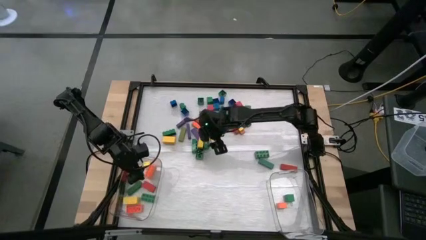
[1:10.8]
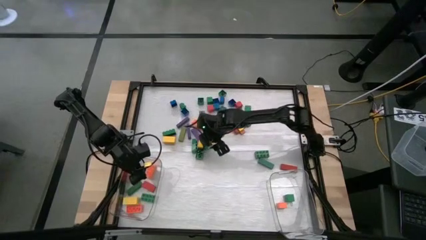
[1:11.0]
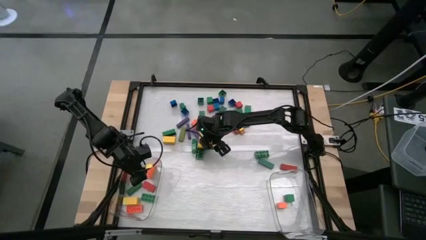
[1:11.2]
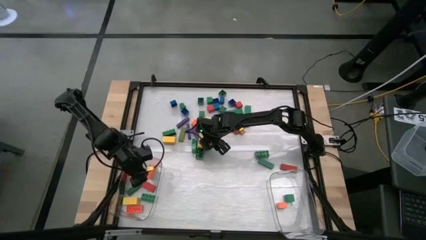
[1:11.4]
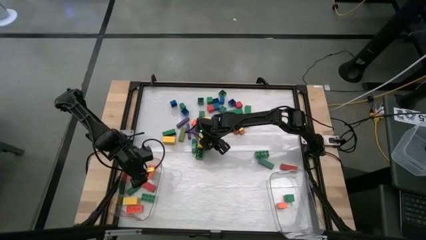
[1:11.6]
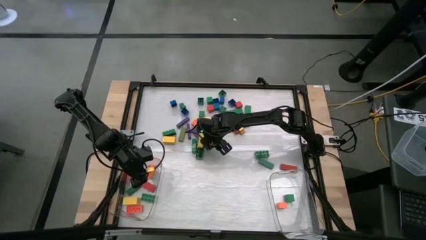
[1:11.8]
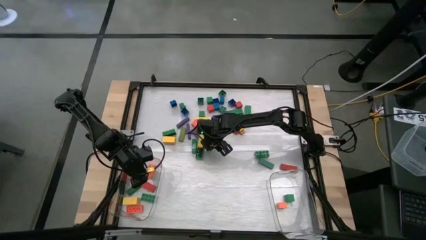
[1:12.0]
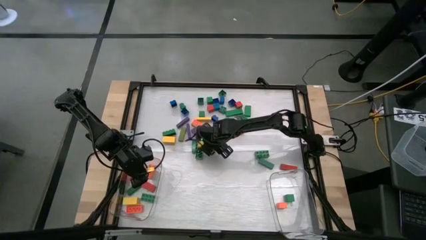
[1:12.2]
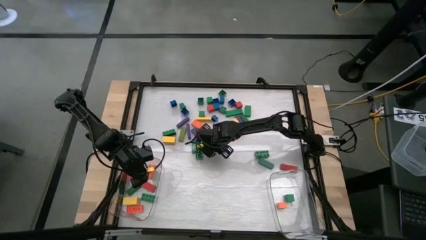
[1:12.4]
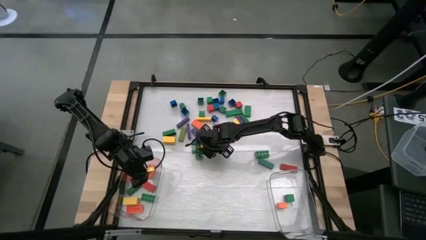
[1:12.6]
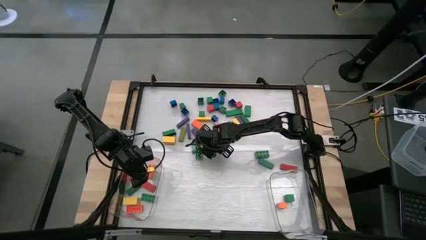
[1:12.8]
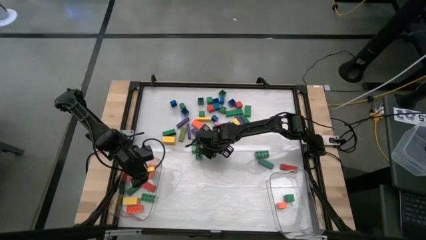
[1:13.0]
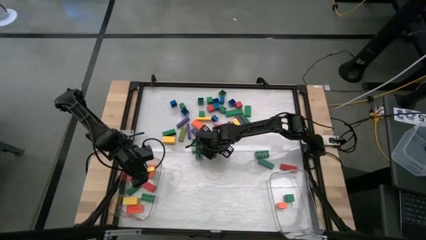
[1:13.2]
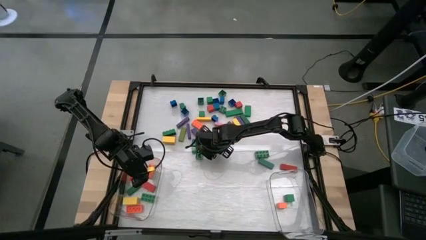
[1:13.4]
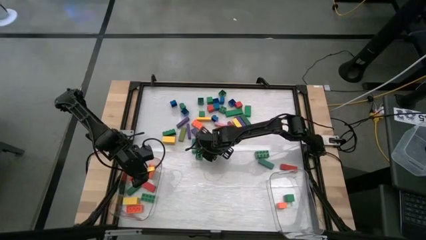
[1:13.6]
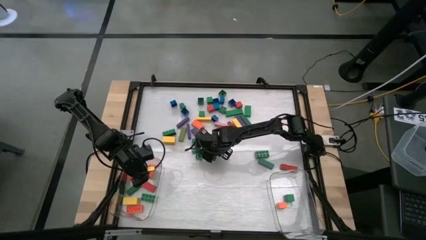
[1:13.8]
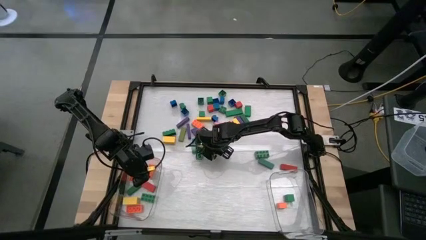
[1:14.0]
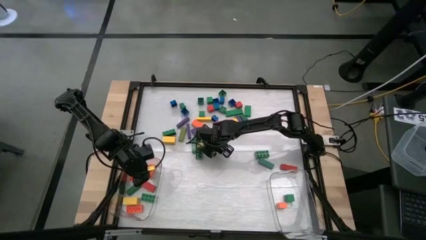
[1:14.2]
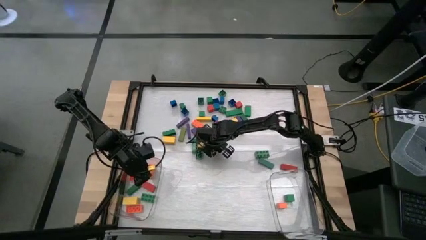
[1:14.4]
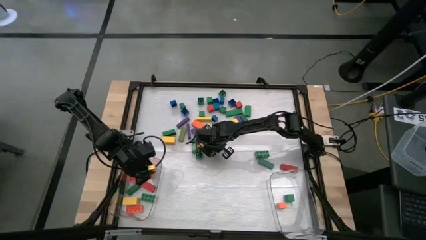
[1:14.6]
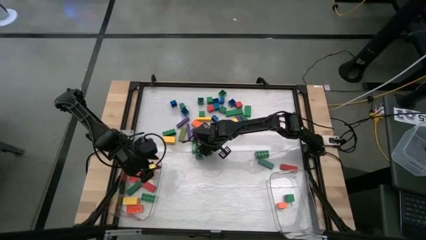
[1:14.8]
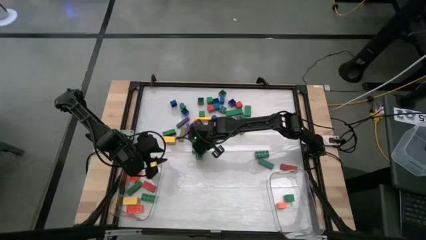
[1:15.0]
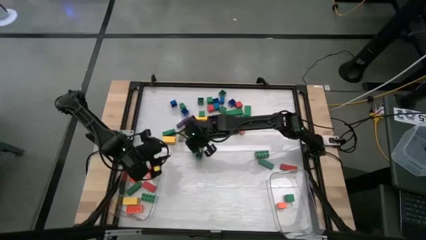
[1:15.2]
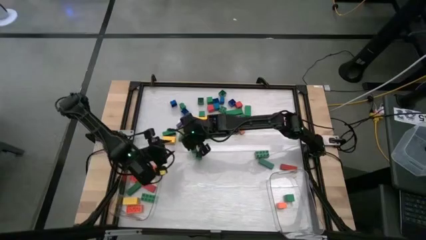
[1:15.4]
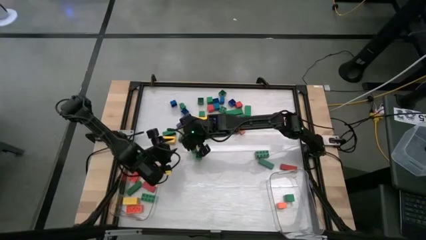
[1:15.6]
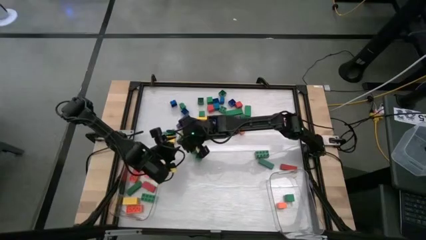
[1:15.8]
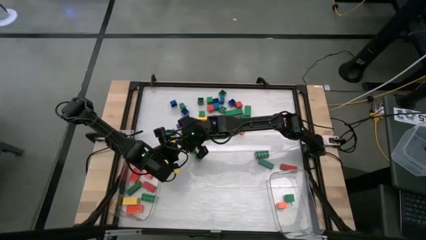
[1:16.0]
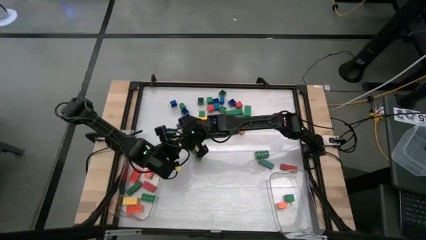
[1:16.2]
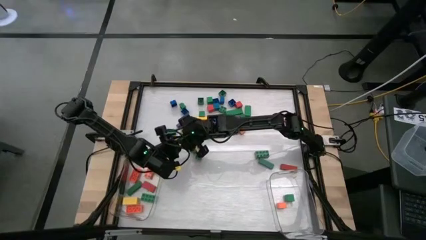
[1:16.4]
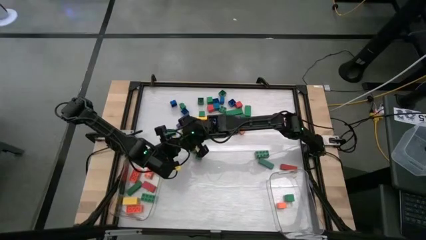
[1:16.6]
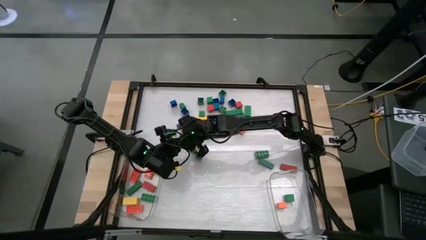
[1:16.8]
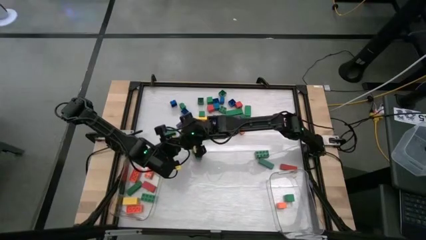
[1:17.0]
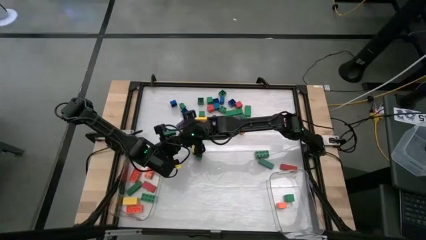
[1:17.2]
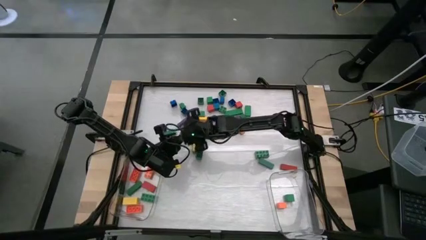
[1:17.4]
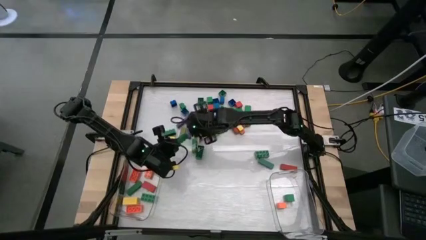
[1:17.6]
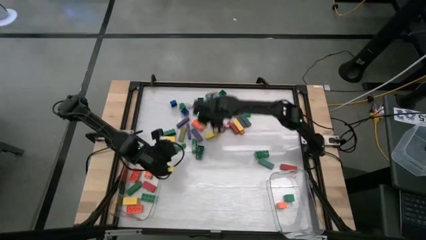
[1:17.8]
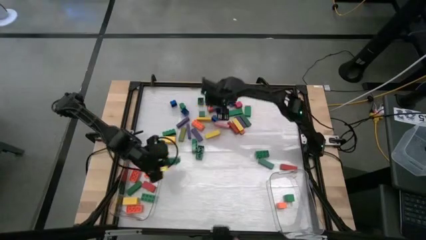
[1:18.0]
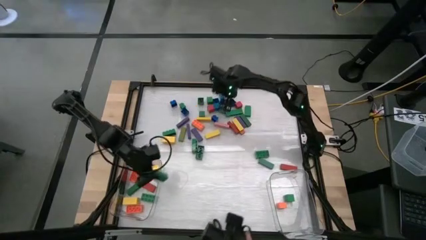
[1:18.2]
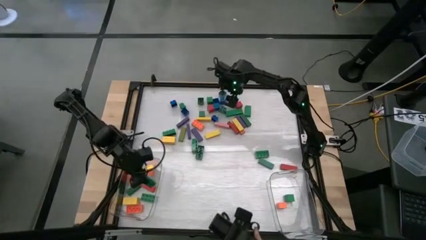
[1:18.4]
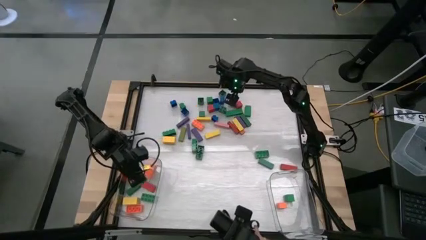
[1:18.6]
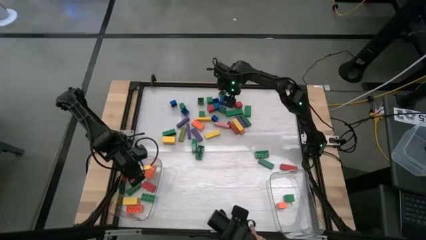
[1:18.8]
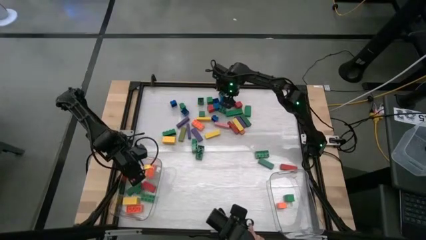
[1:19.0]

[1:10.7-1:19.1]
Task: Sort blocks by size
Put the large green game piece into the left transparent bin

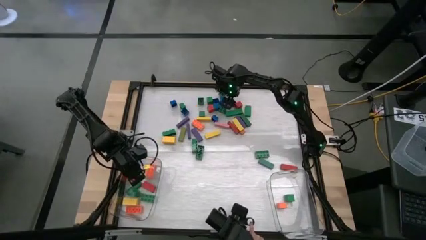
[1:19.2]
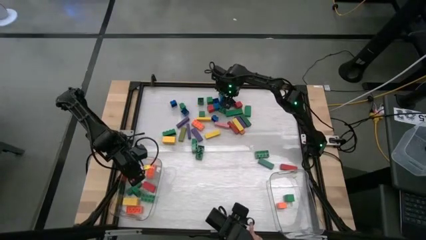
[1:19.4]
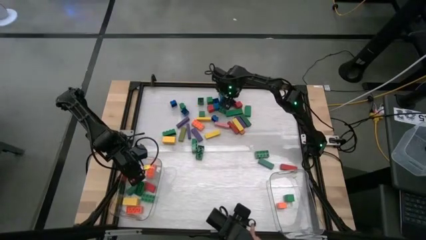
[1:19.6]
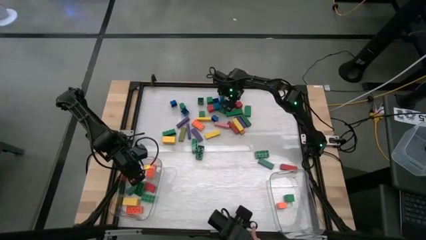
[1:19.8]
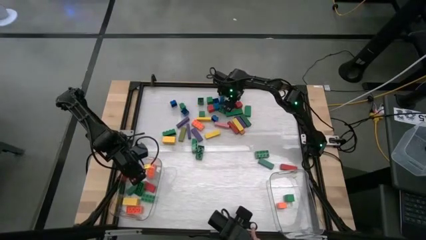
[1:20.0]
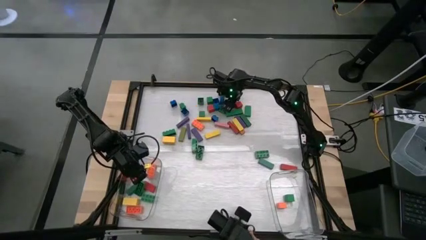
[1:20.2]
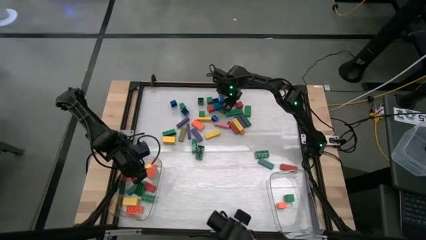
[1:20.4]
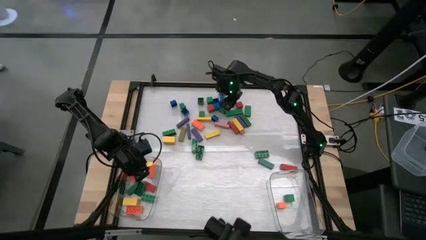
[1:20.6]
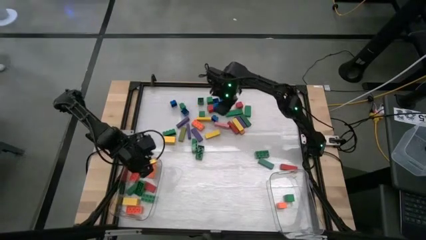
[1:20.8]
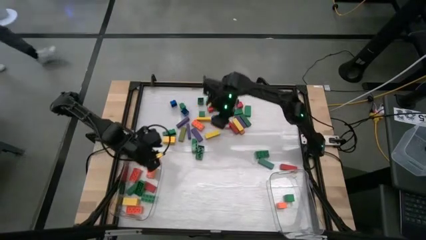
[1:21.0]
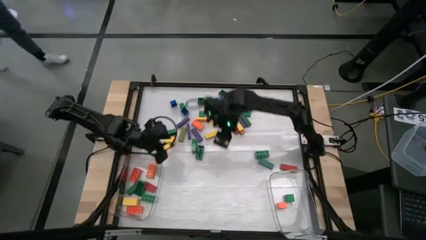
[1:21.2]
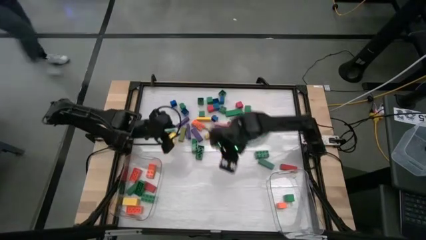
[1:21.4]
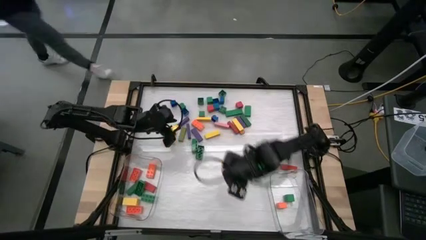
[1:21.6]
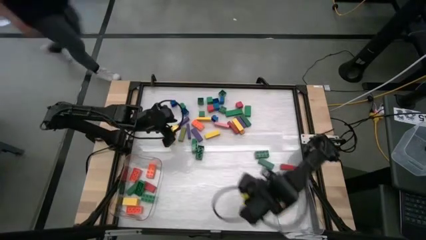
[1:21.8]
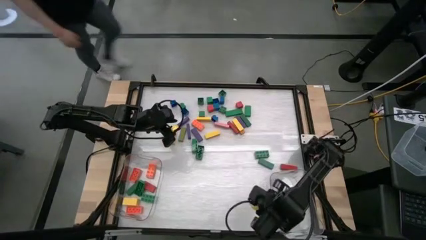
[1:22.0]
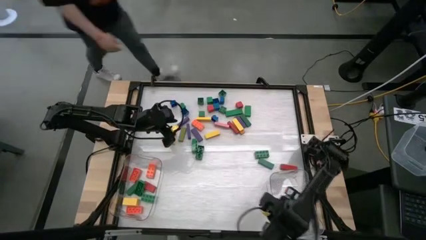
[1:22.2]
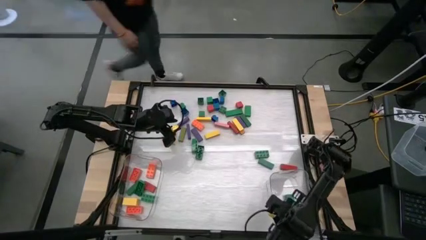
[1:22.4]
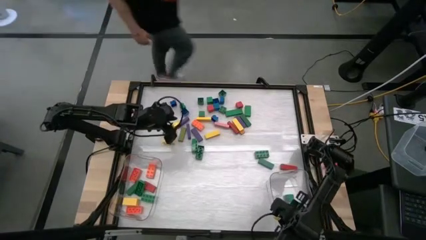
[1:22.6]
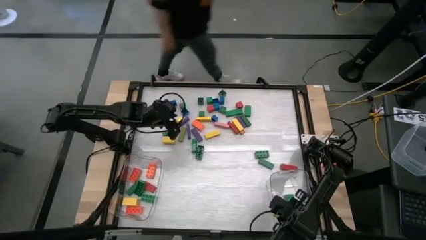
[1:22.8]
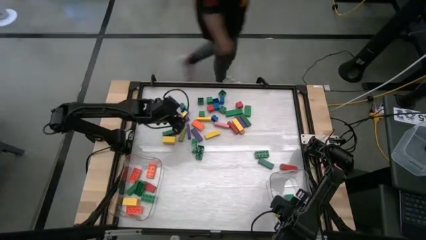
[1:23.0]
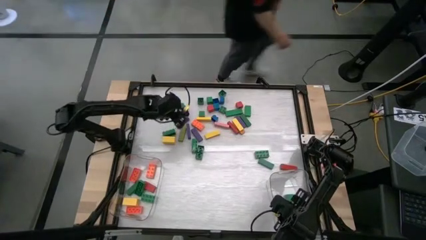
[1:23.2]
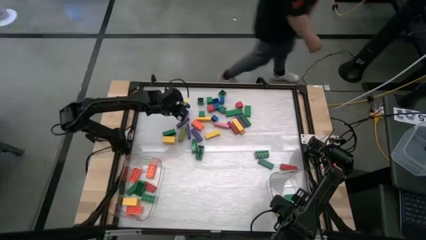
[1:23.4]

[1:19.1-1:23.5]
Put the small blue game piece into the right transparent bin

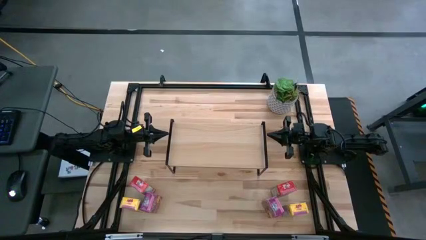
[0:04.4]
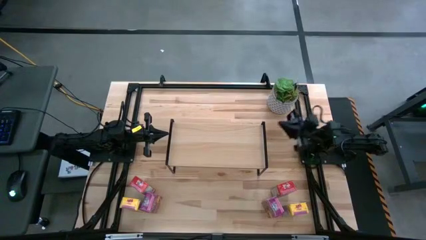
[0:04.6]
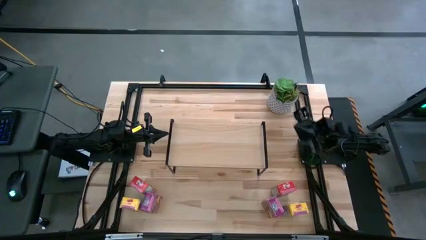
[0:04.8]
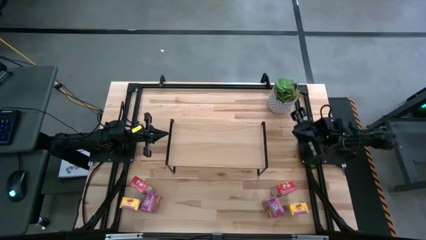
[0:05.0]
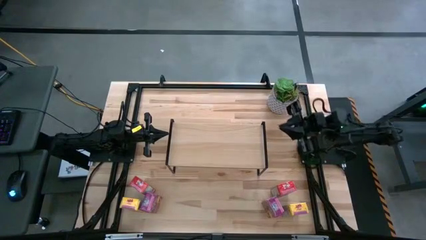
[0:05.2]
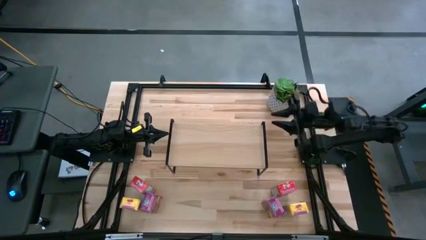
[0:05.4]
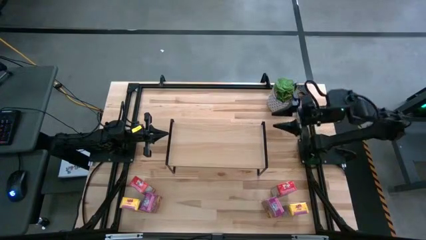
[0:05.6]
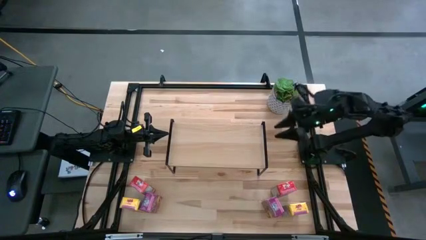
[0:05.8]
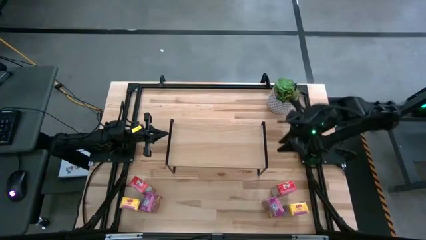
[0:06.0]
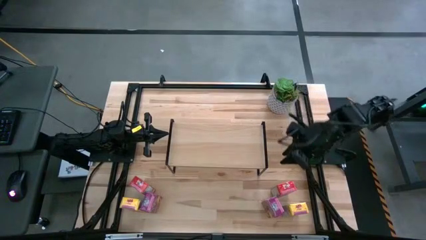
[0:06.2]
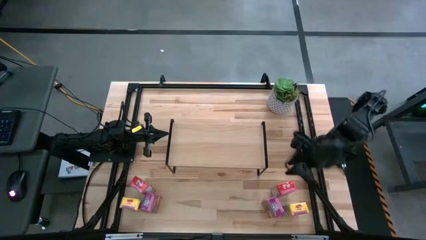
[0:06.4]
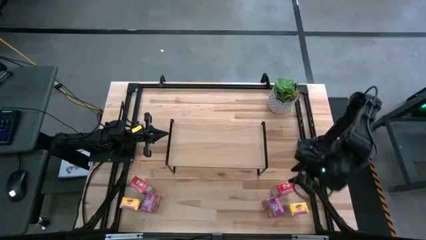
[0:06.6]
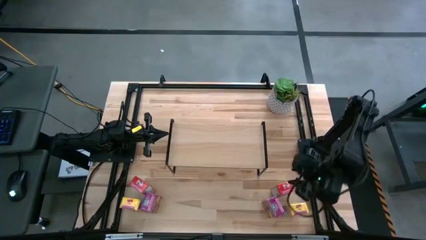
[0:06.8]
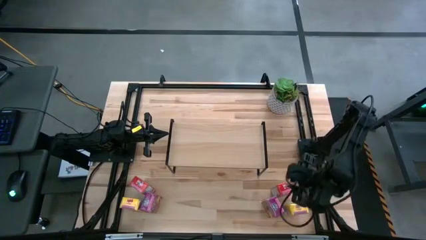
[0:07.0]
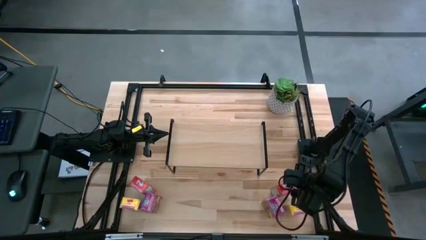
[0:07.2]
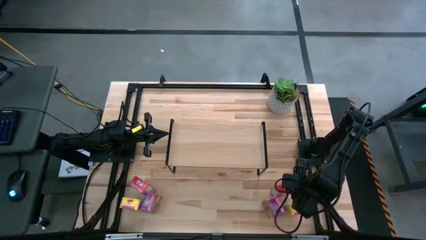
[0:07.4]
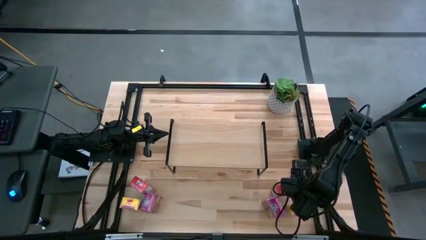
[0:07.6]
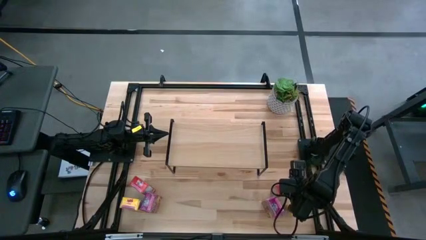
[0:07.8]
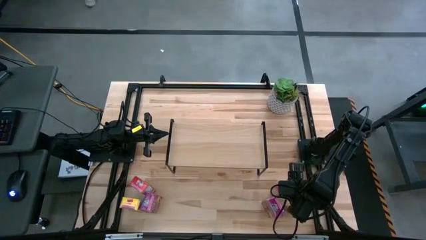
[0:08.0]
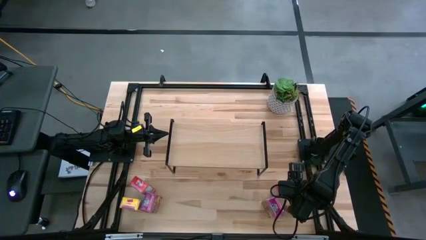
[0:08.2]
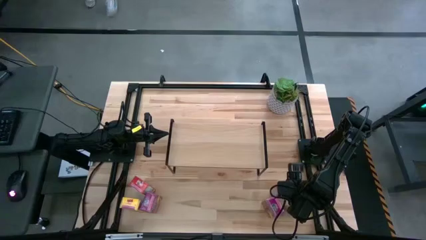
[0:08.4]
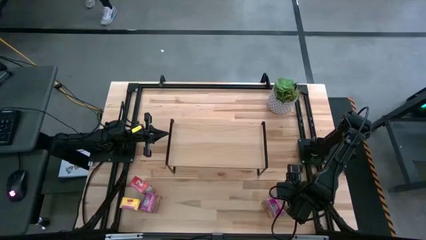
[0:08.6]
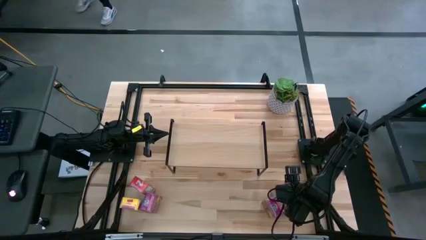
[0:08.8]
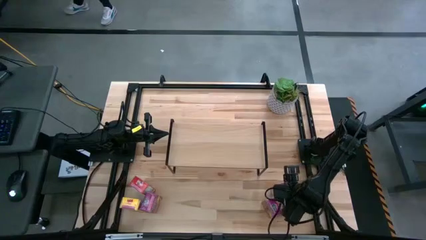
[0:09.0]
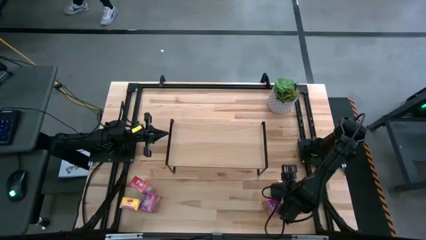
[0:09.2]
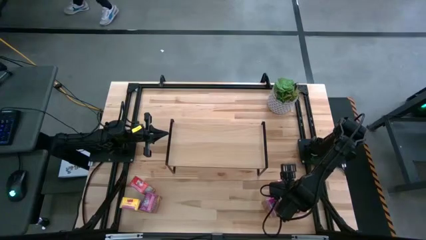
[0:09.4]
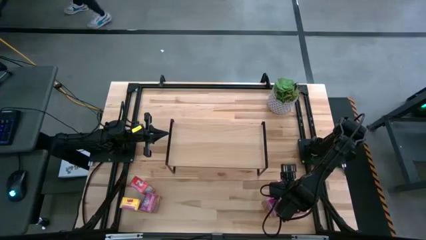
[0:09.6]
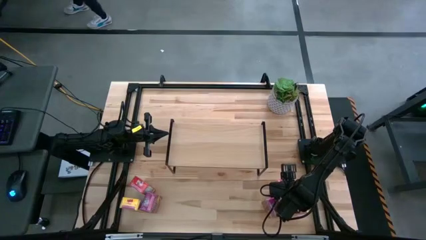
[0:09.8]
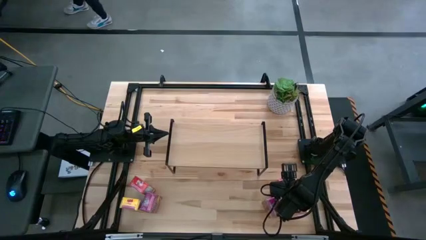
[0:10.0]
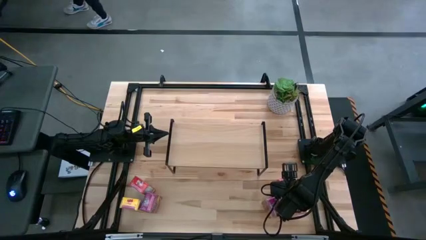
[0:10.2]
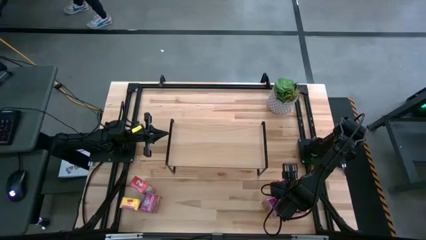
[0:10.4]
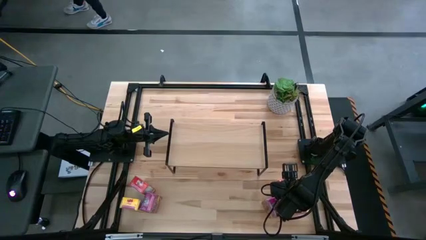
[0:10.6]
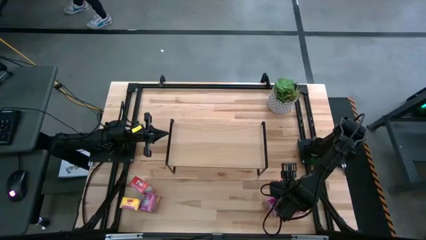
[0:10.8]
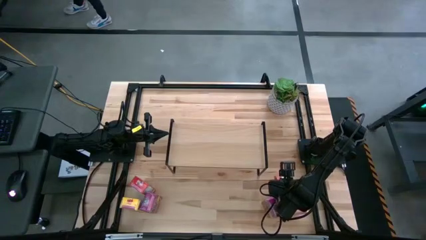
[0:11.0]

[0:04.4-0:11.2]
Task: Stack cereal on shelf
Put the right red cereal box on the shelf
